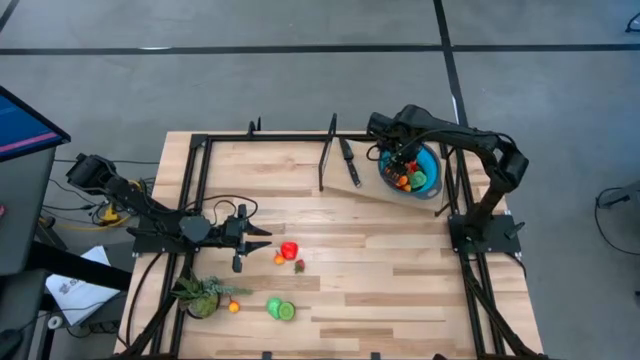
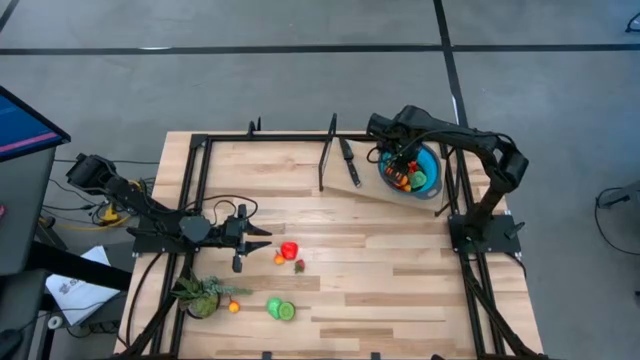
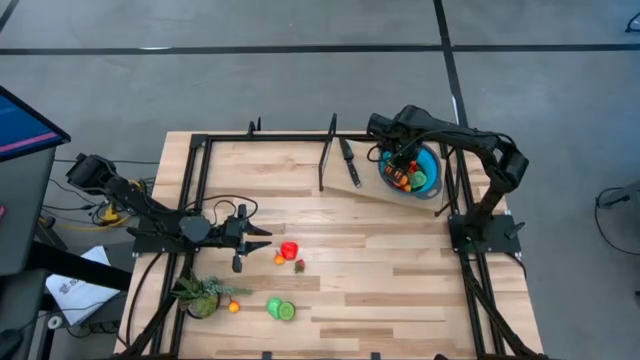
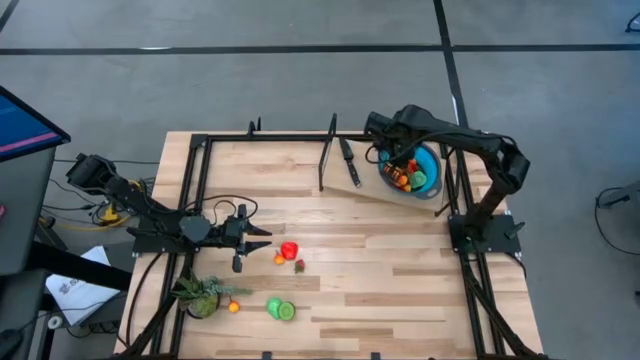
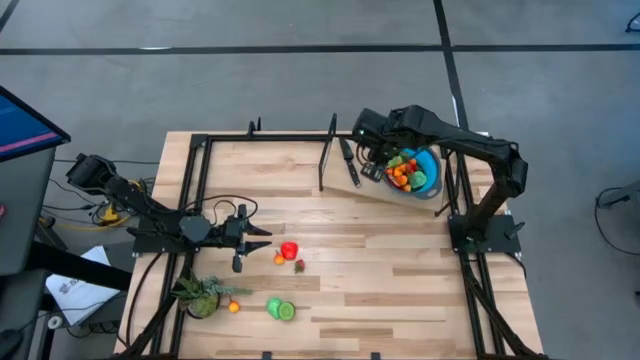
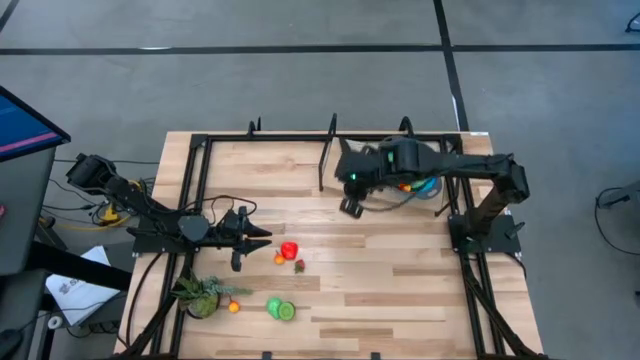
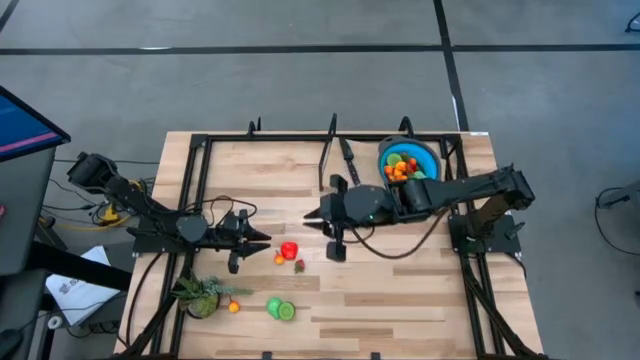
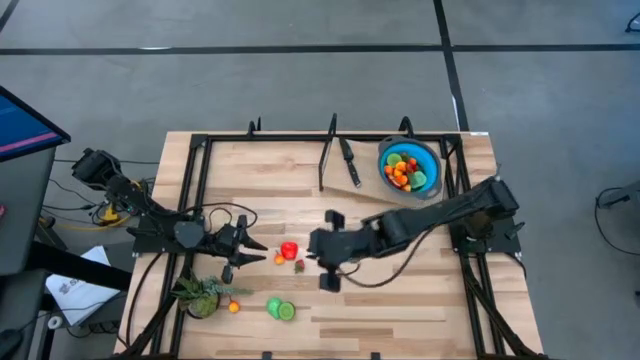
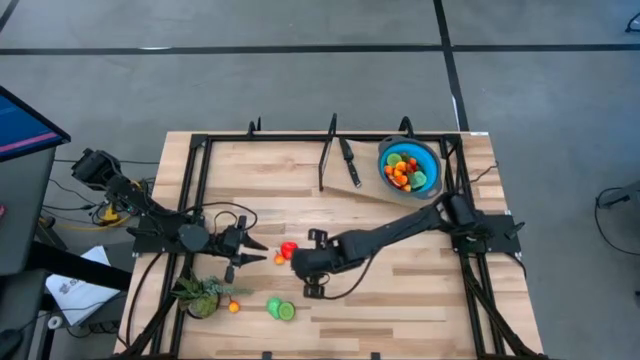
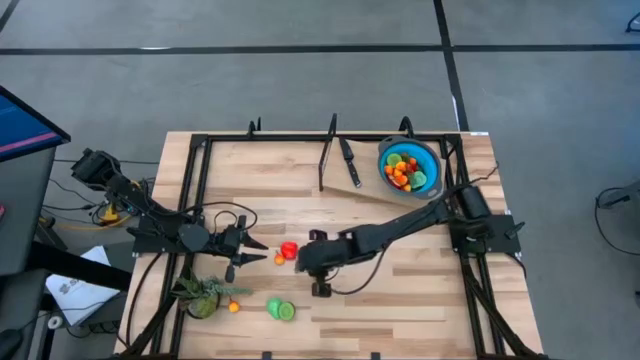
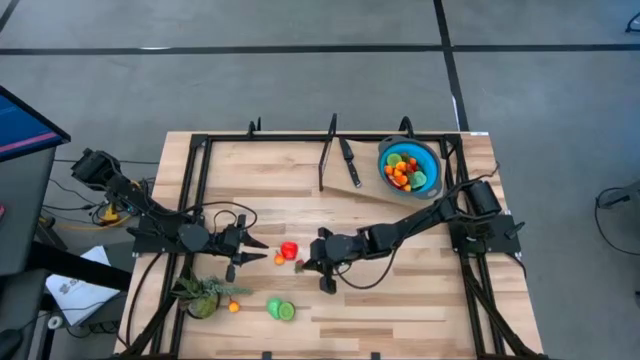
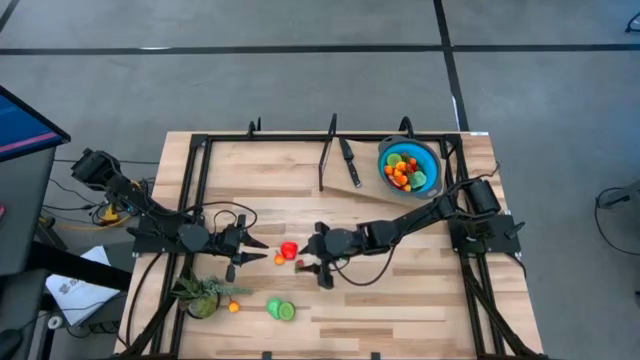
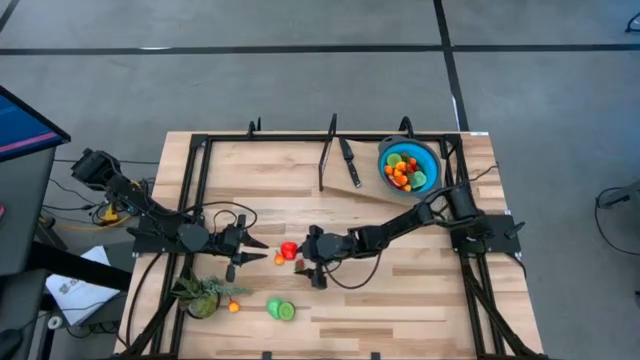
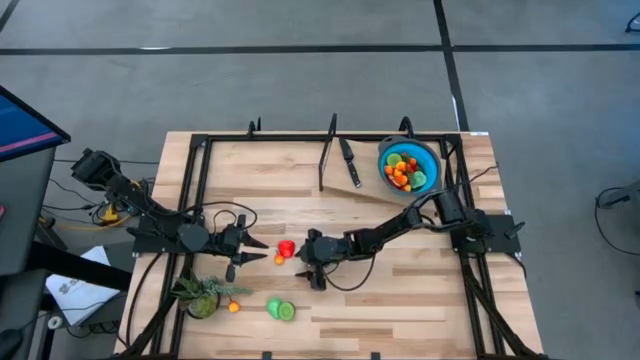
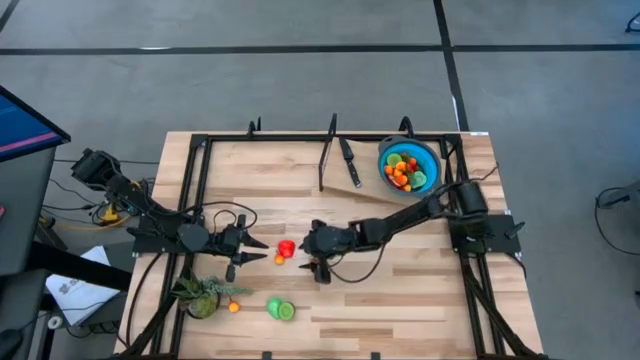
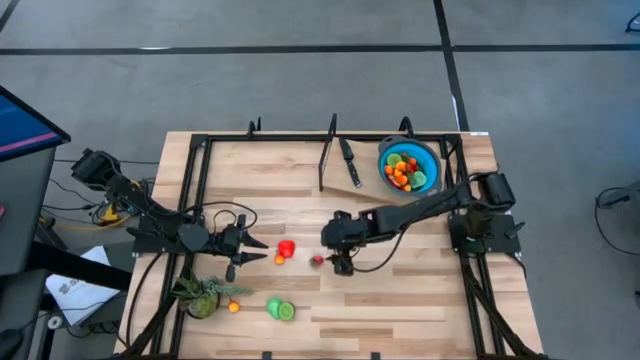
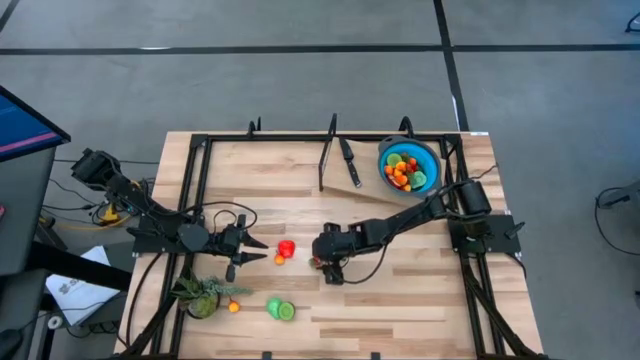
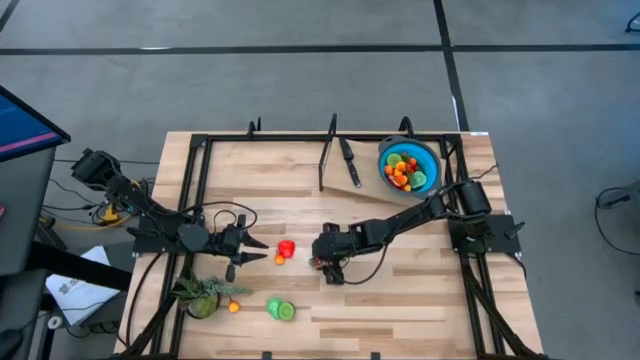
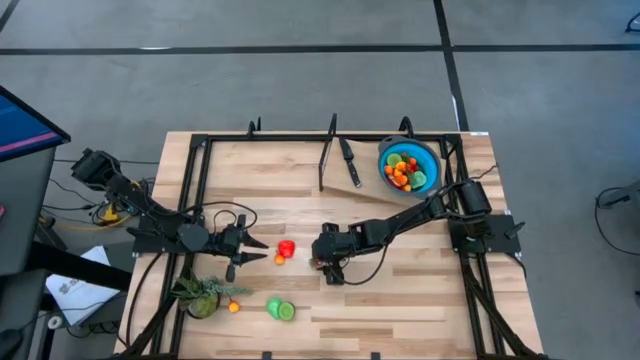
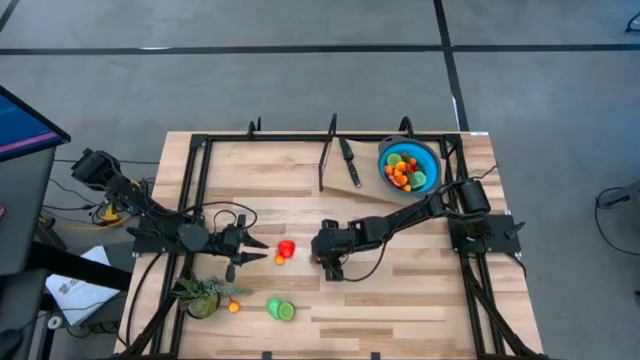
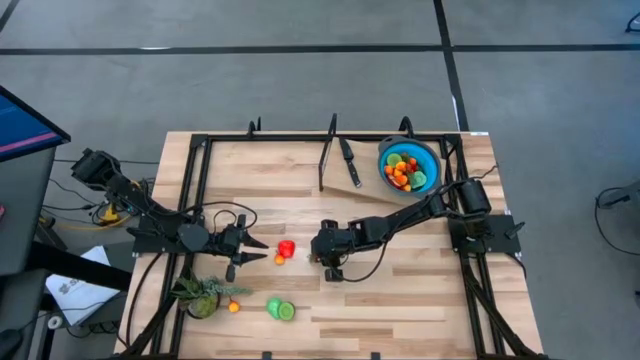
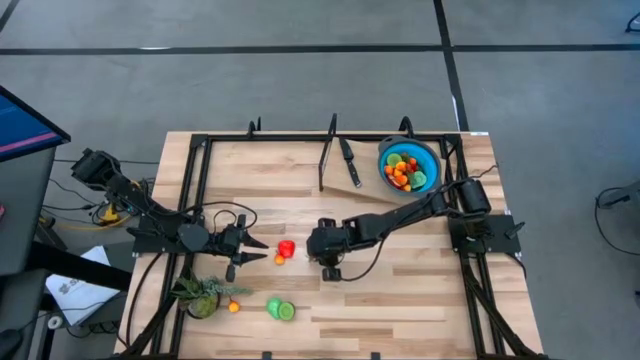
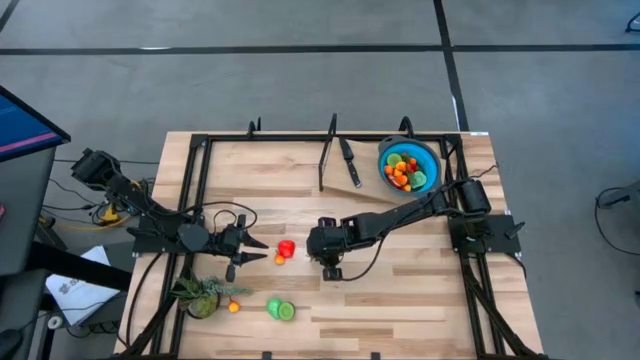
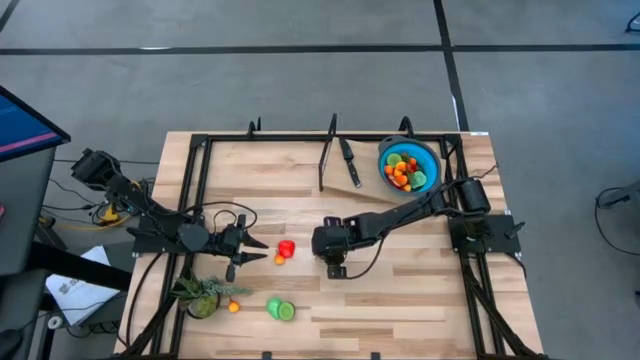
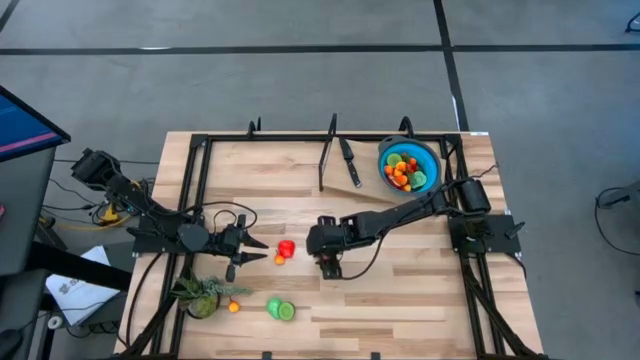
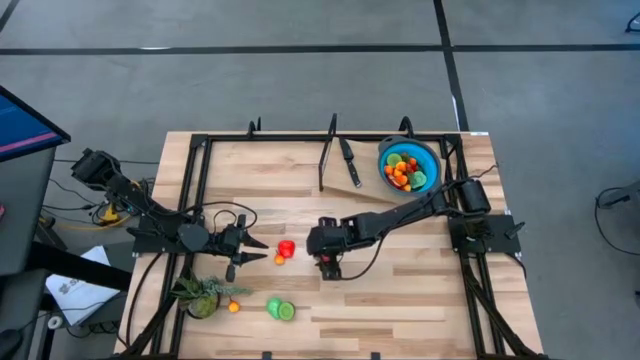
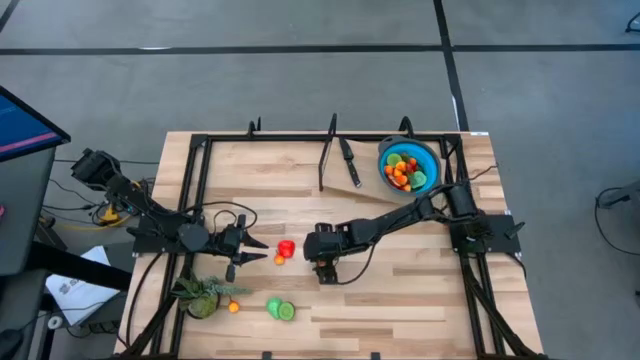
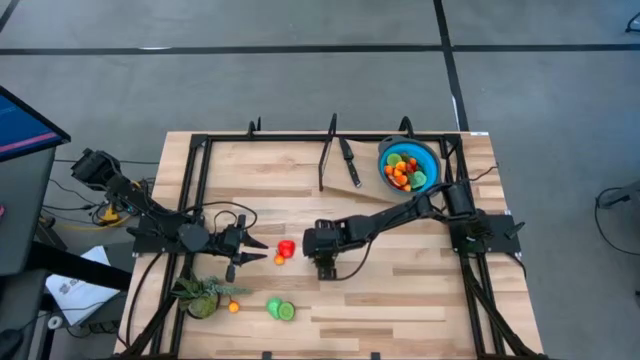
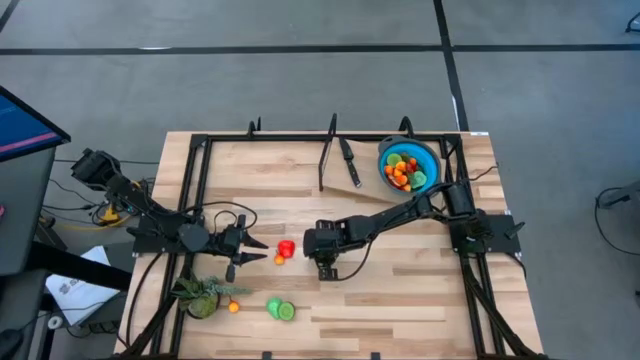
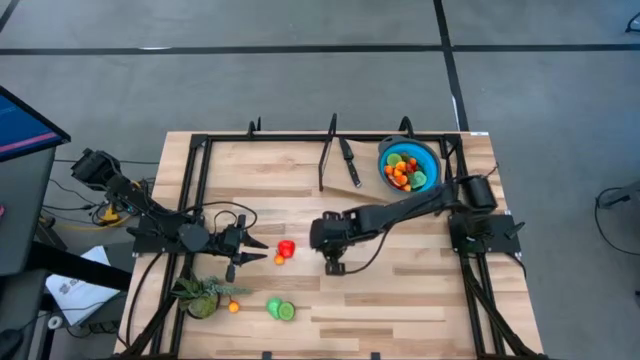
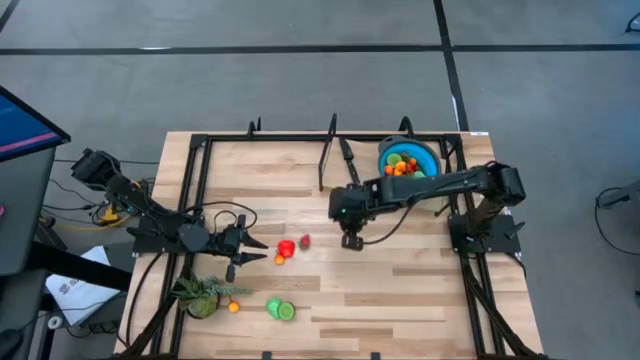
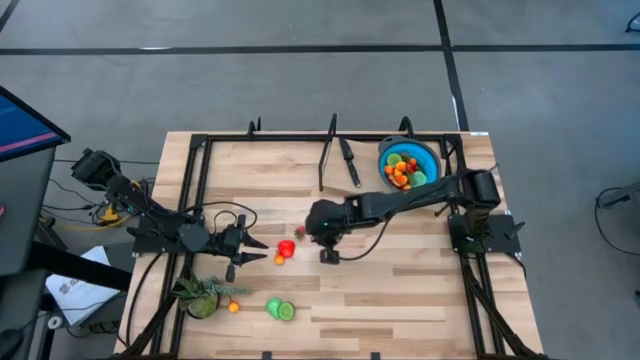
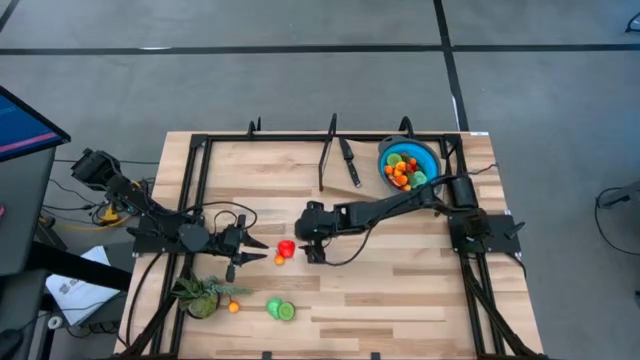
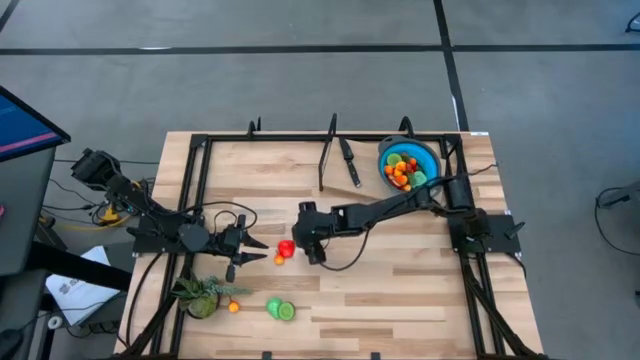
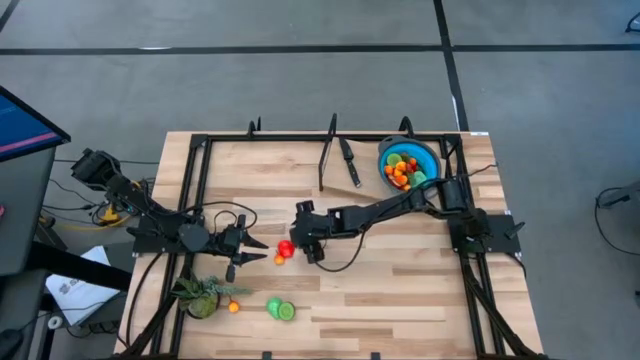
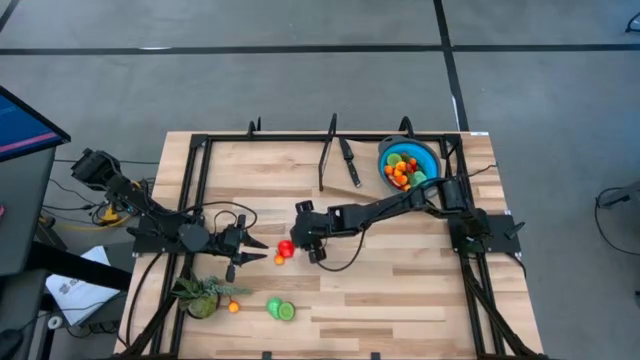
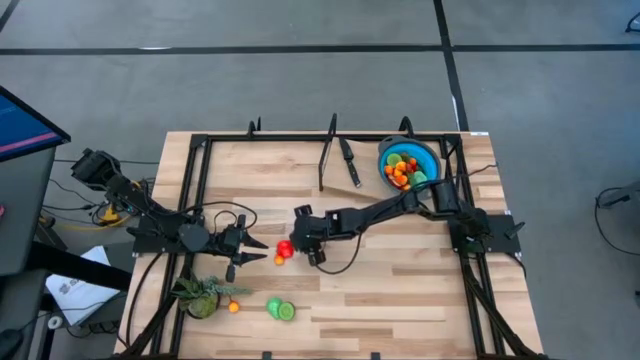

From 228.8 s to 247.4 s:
Task: Pick & Place Fruit
Put the red strawberry into the blue colander

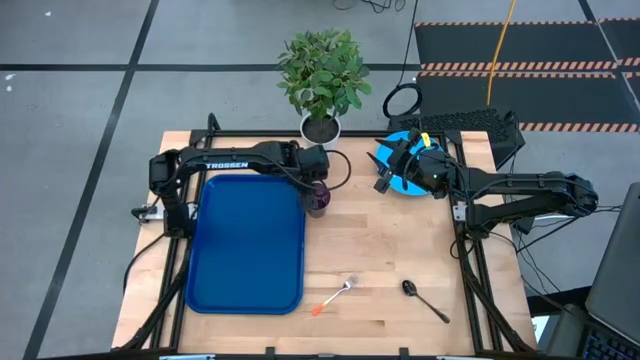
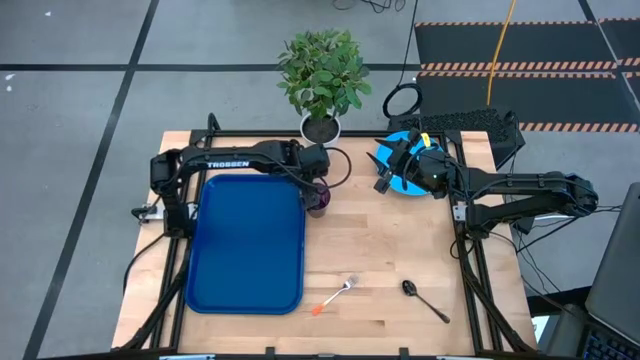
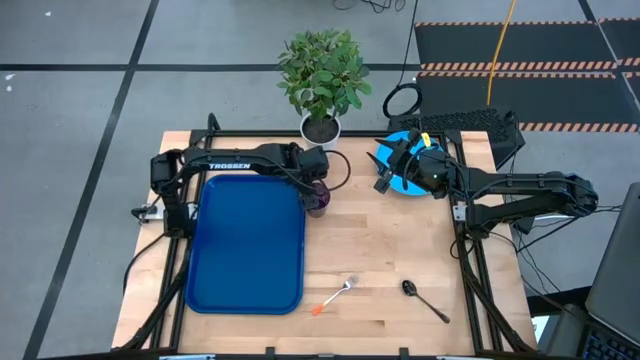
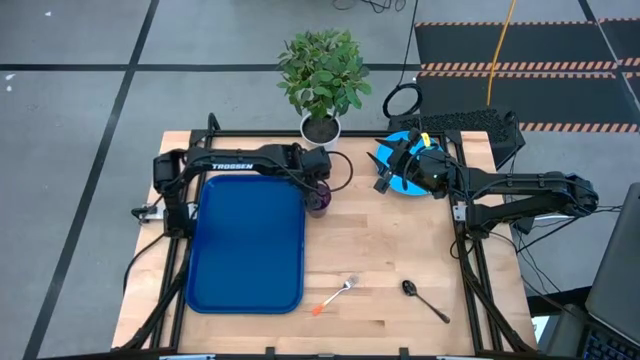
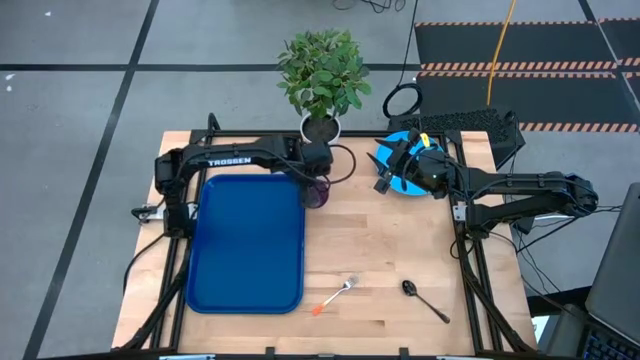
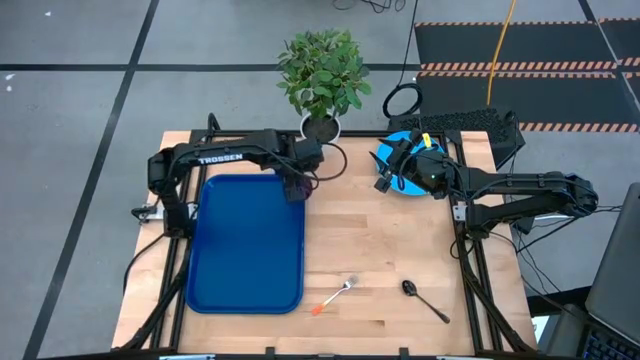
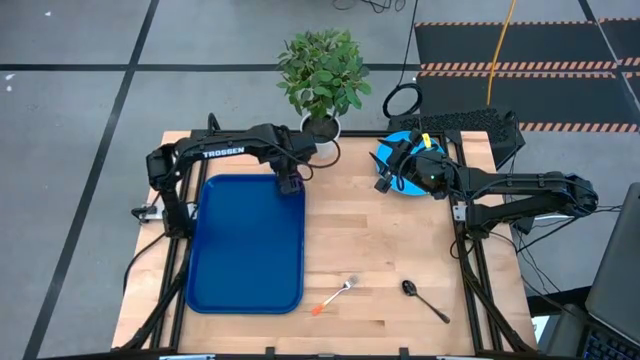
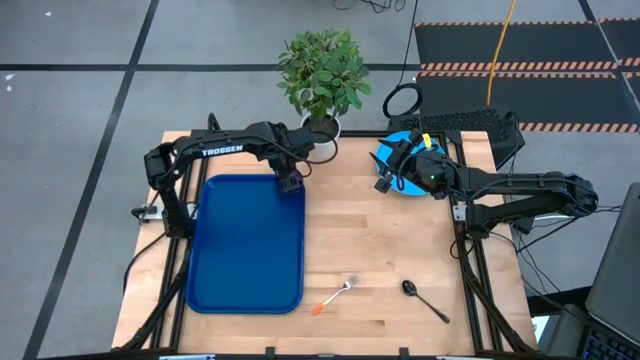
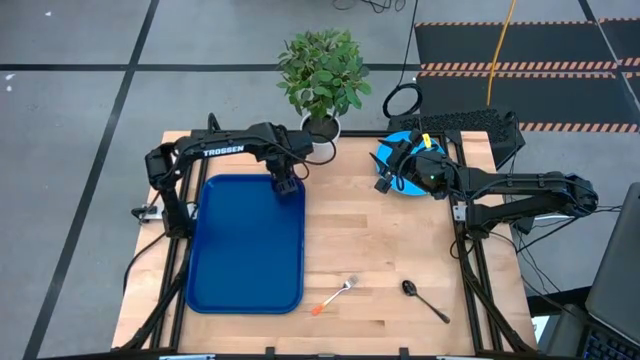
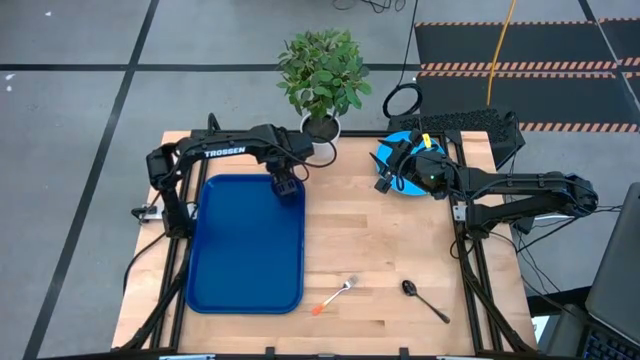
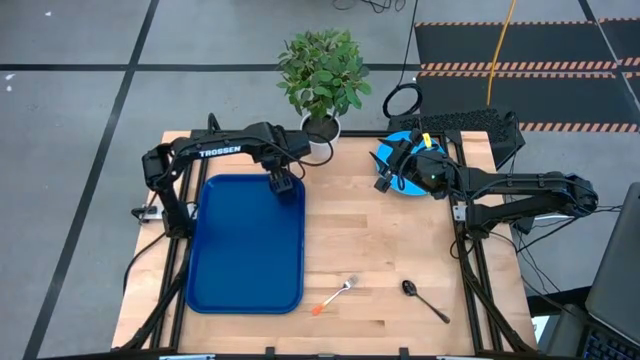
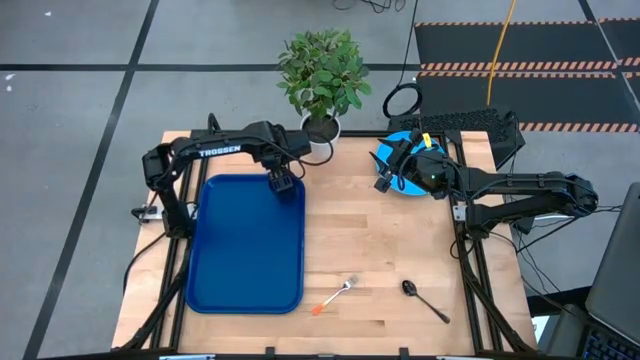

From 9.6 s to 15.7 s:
Task: Pick and place plate/cup/fork/spoon on tray
Put the violet cup on the blue tray
